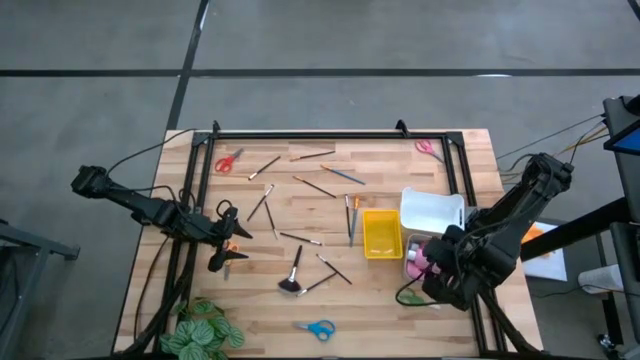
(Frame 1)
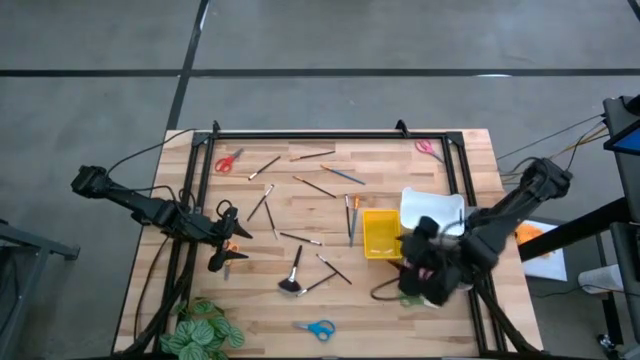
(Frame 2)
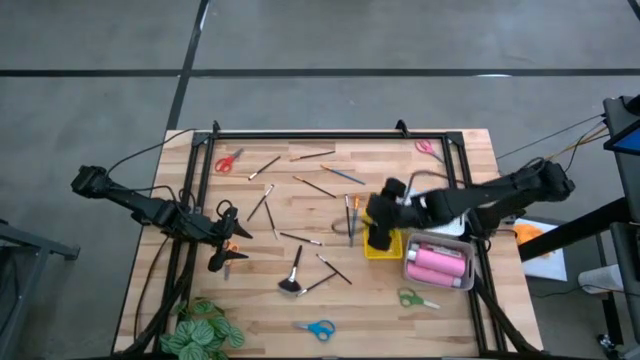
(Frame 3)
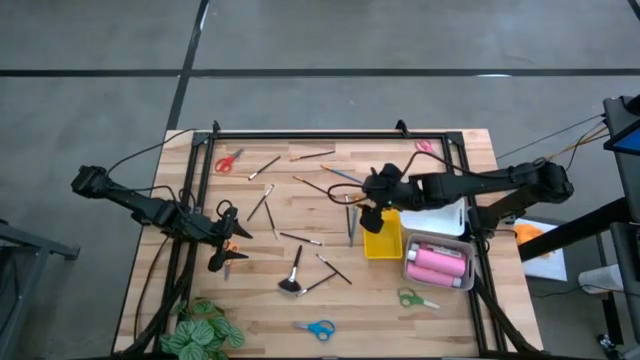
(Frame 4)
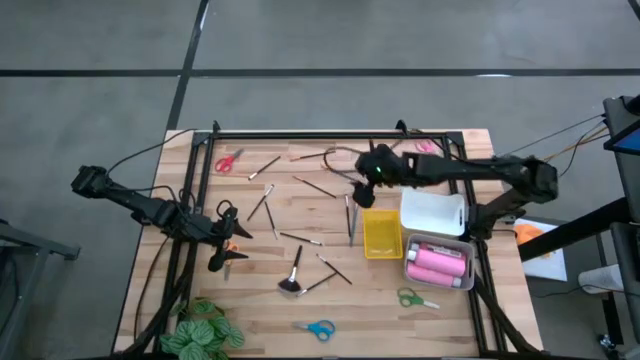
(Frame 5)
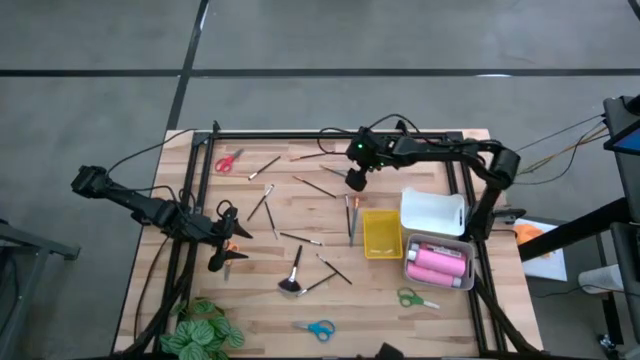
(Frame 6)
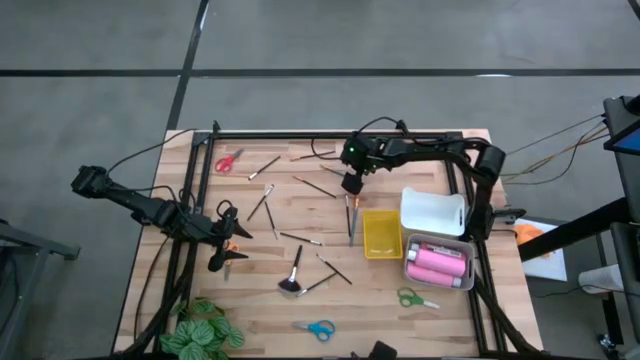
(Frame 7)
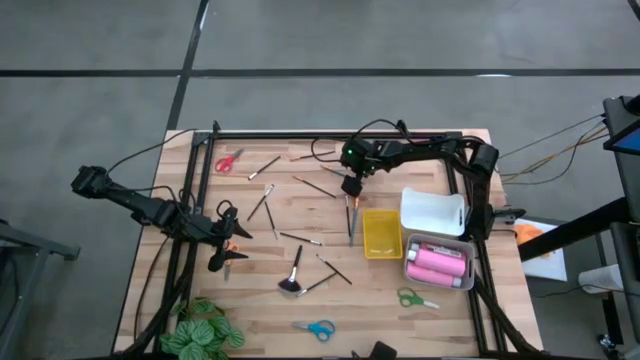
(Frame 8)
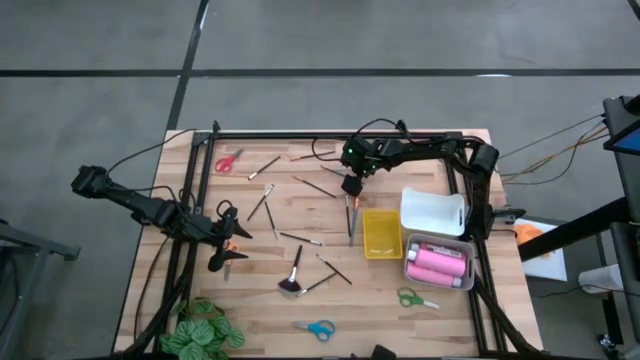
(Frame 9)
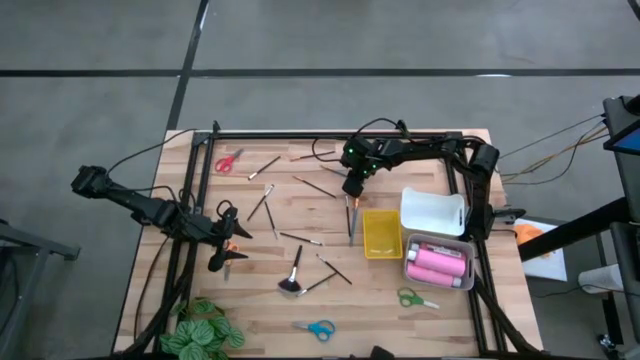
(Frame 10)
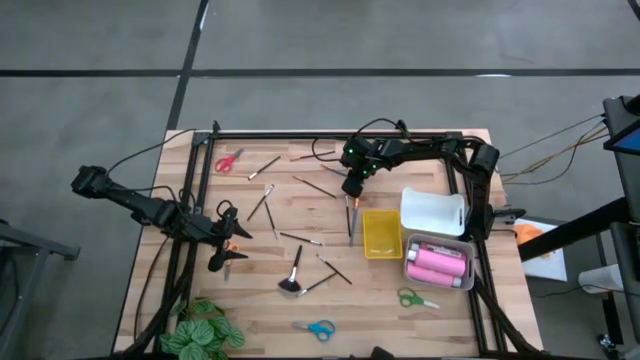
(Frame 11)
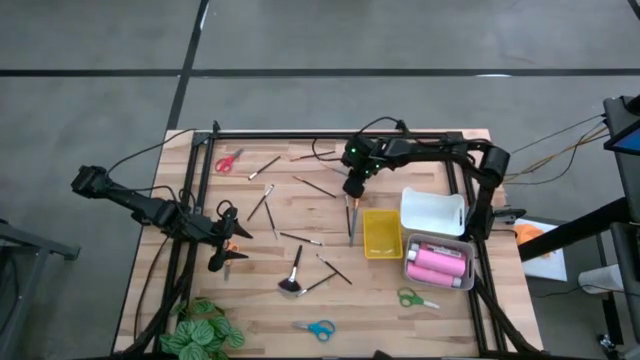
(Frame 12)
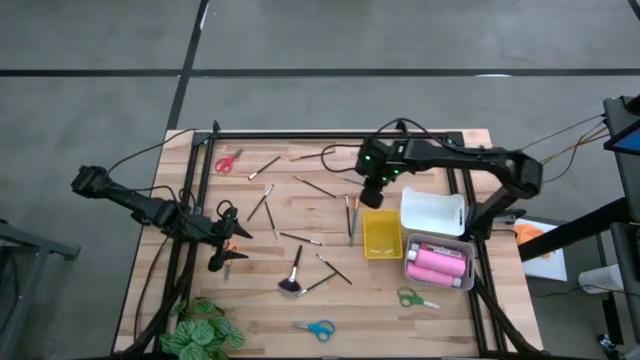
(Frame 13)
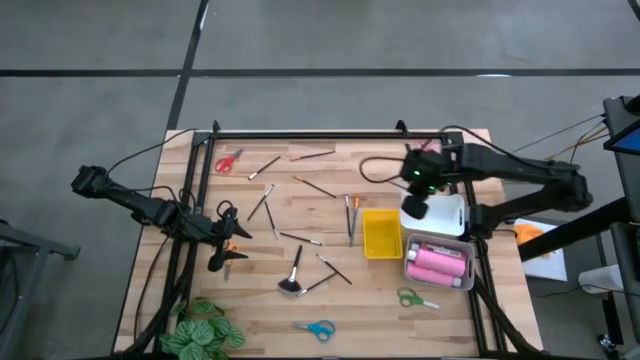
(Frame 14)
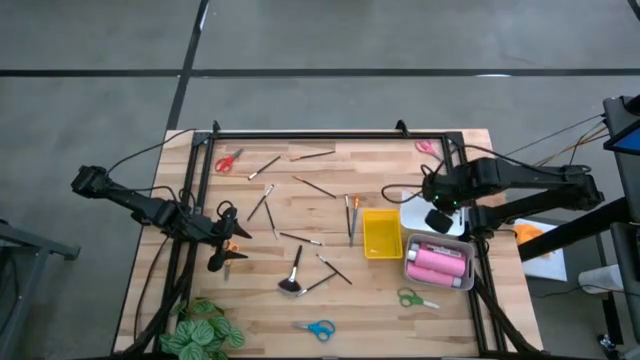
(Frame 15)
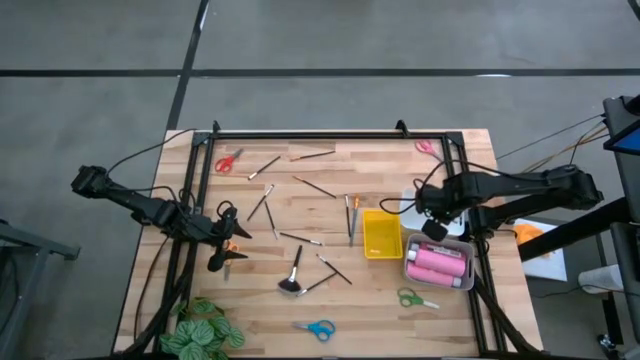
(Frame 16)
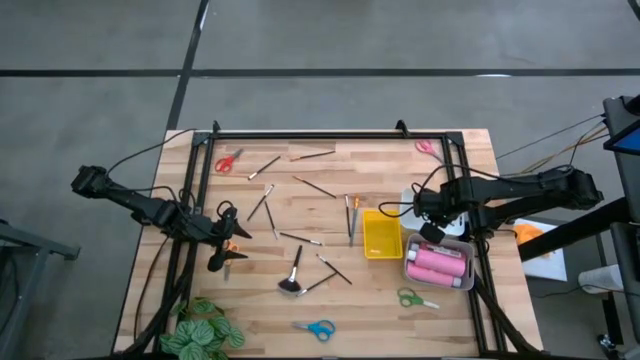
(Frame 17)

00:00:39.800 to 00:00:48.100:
Task: Pick & Place Paint Supplies
Put the blue paint brush into the white bin

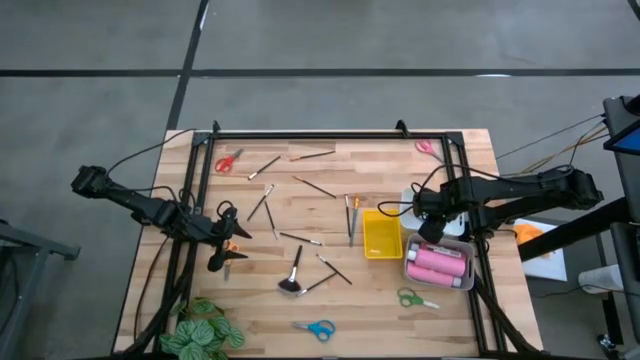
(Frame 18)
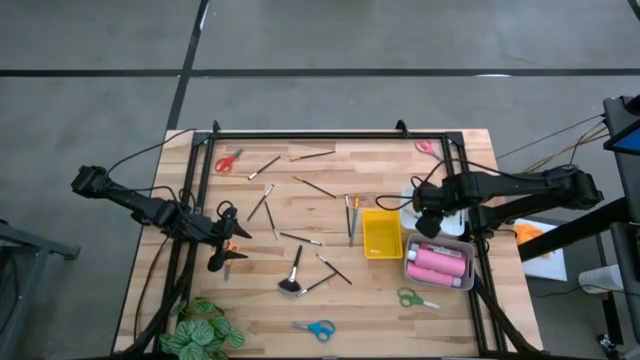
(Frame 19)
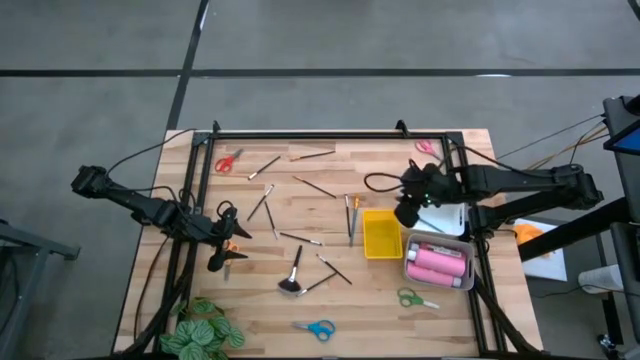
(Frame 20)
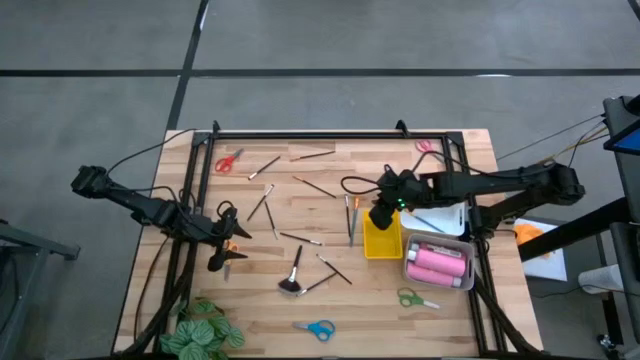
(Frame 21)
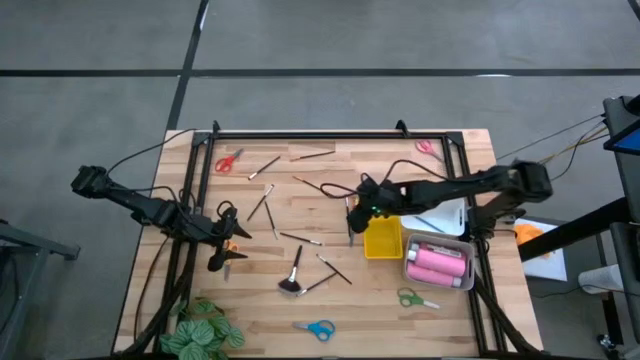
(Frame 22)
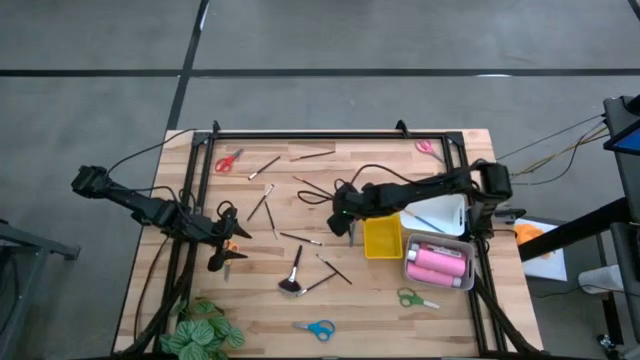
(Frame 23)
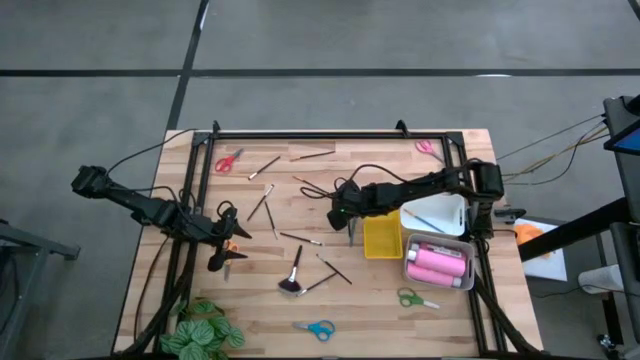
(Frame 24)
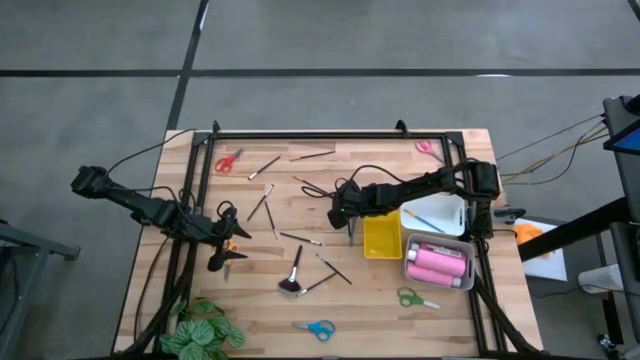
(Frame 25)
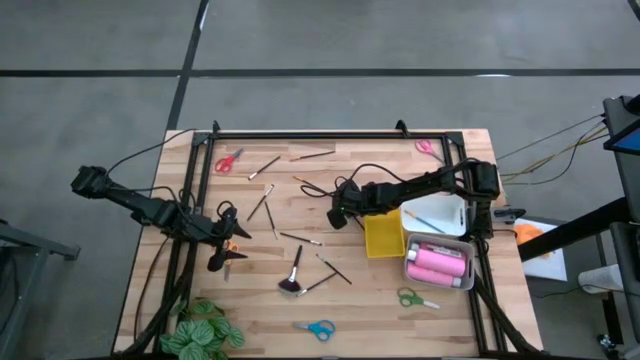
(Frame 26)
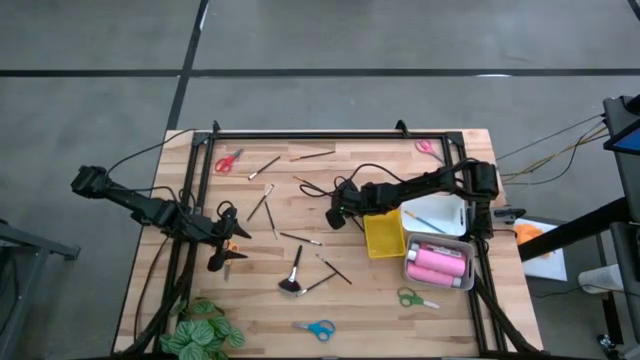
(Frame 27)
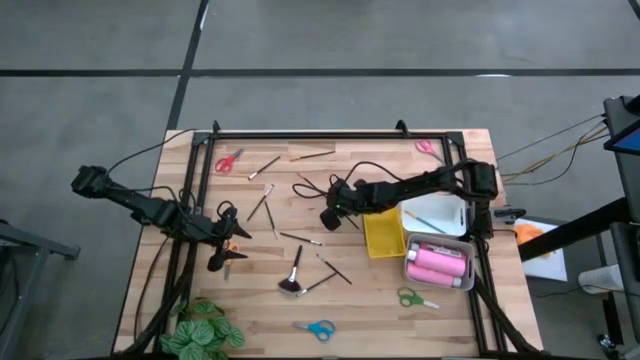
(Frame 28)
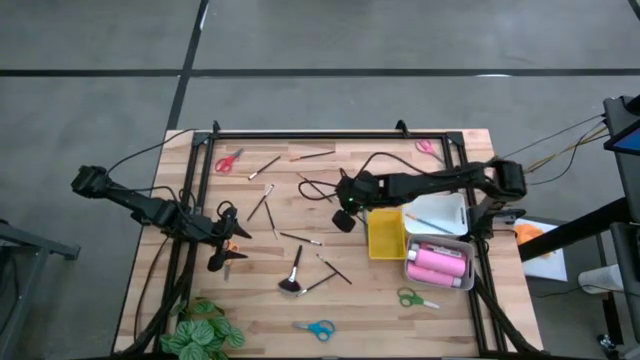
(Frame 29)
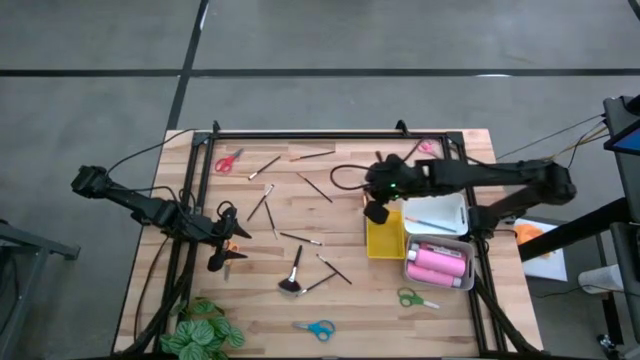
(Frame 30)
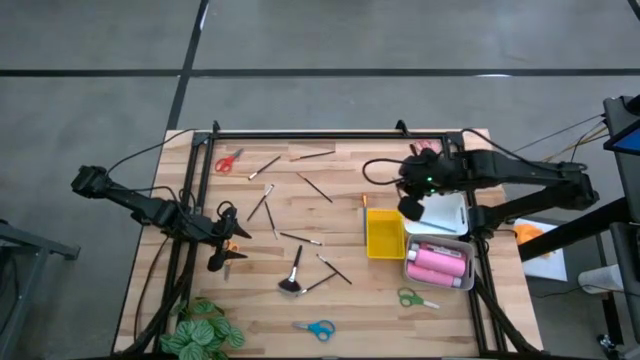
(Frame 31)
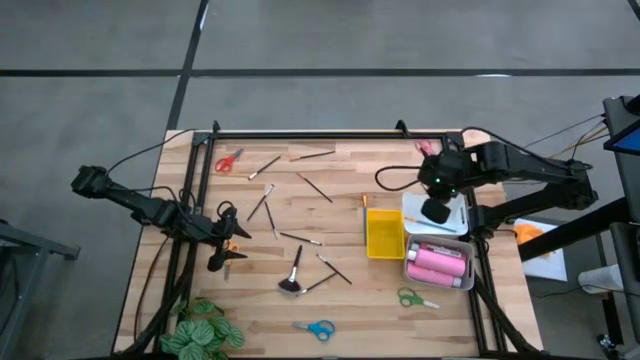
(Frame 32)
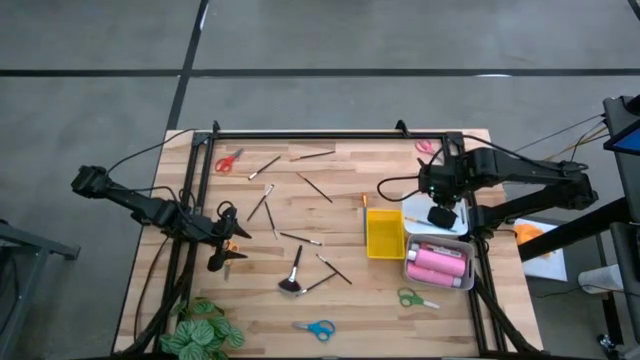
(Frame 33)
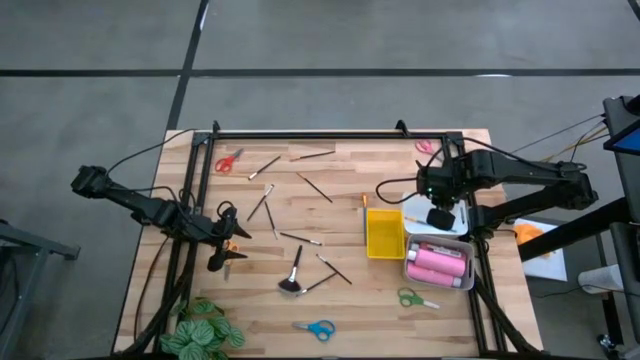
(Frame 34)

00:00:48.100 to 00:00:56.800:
Put the black paint brush into the white bin

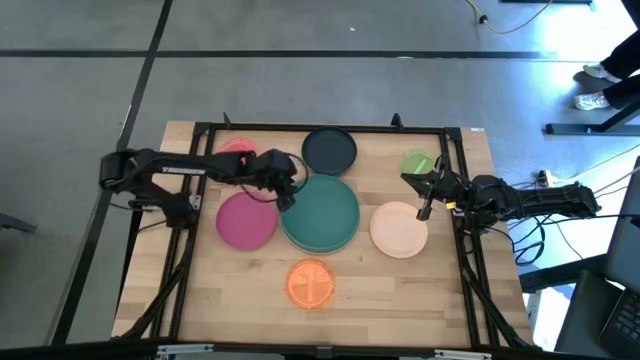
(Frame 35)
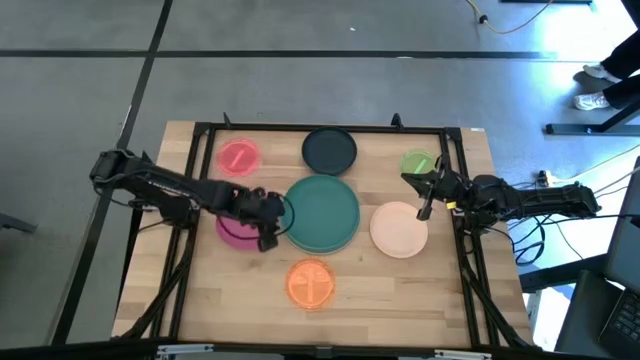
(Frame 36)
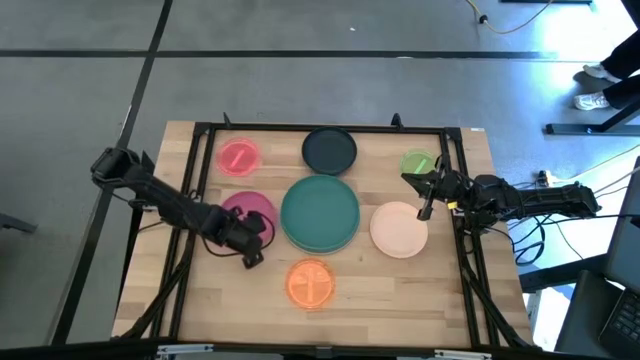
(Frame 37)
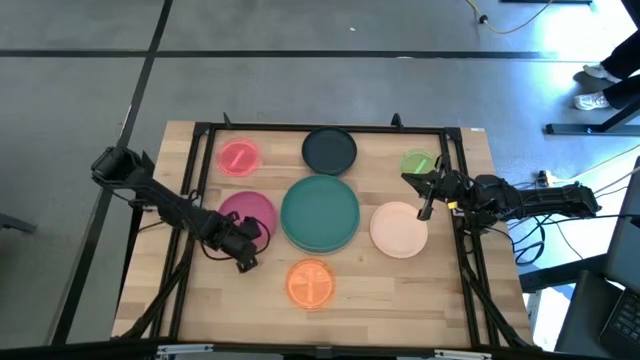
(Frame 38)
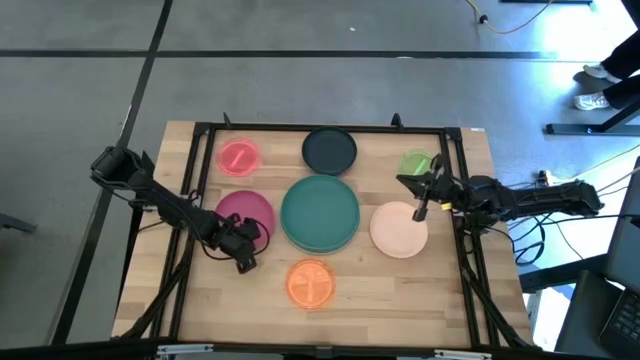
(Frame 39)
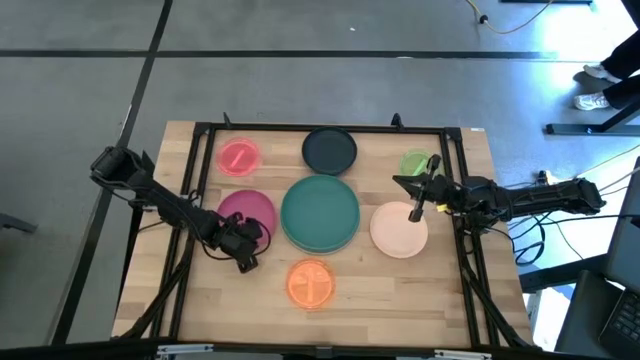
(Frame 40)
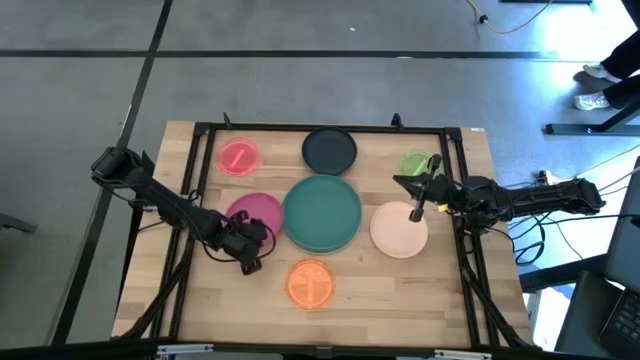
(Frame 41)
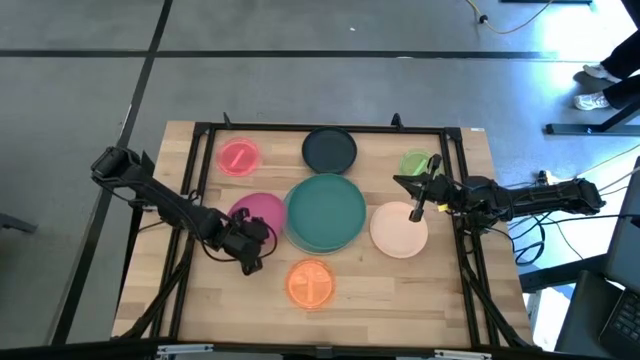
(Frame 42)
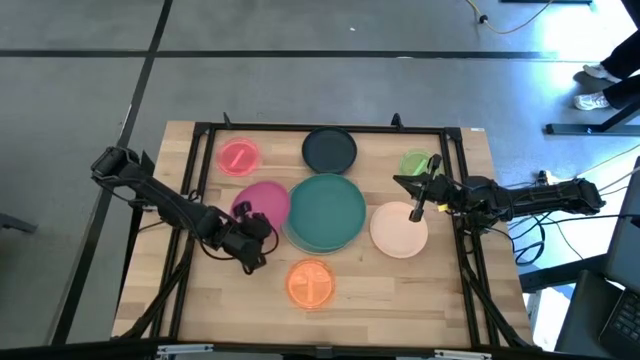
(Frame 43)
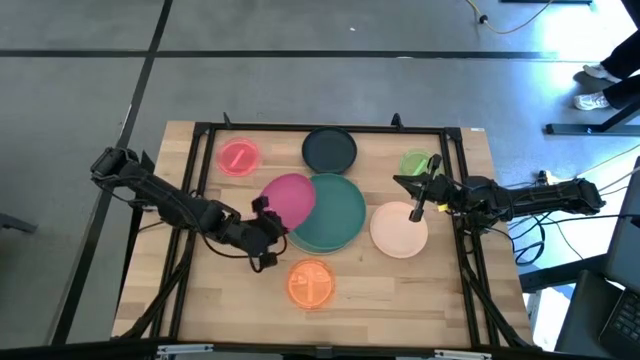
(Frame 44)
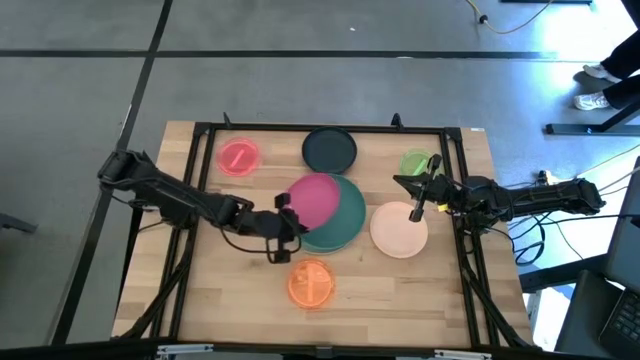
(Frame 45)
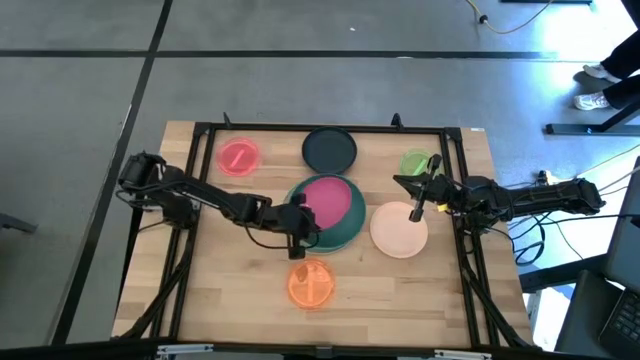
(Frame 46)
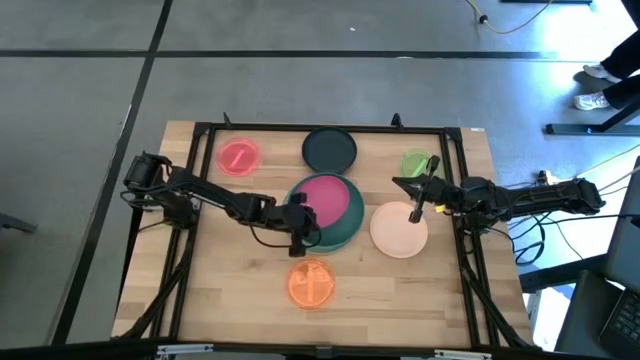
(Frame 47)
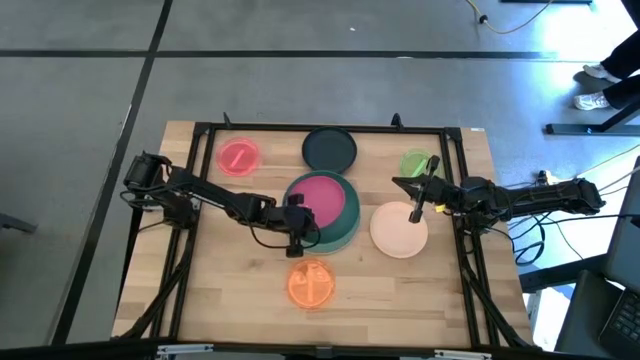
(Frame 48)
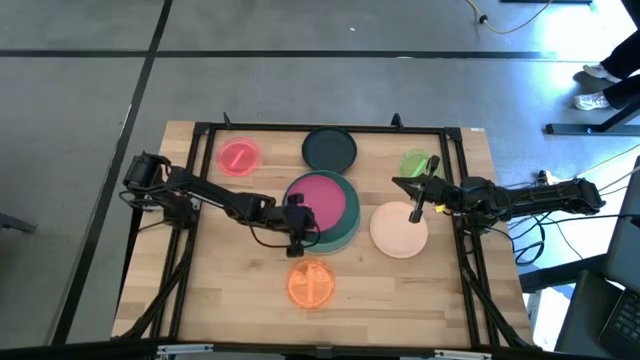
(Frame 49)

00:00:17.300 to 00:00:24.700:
Task: Stack plastic plates
Stack the pink plate on the dark green plate
